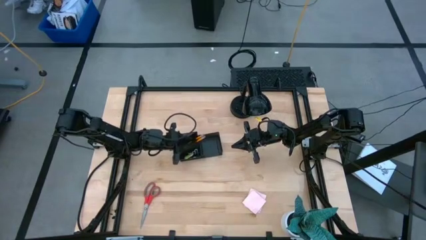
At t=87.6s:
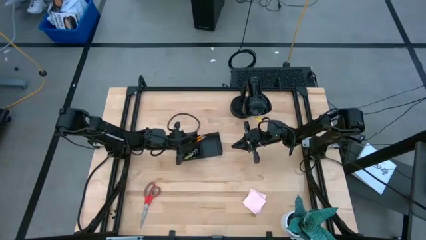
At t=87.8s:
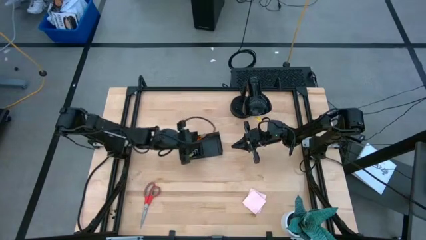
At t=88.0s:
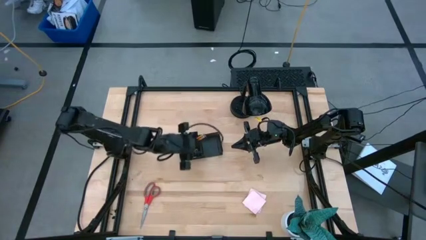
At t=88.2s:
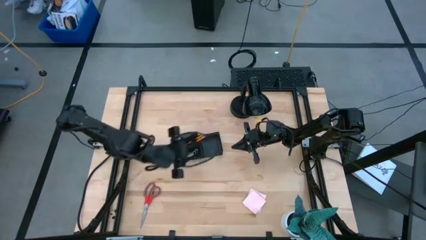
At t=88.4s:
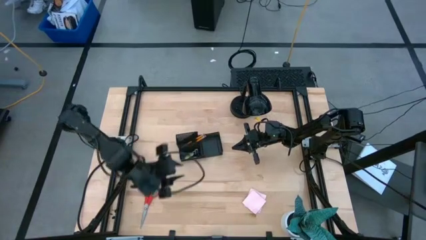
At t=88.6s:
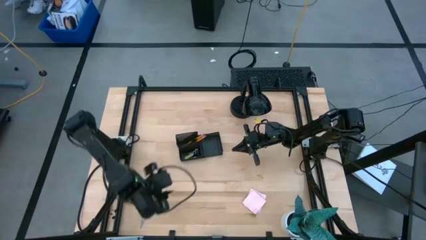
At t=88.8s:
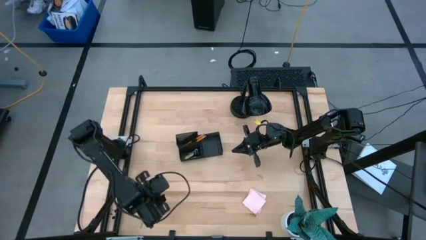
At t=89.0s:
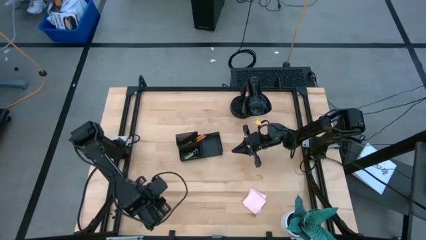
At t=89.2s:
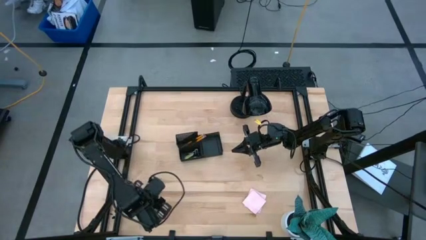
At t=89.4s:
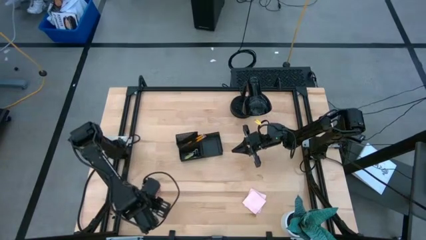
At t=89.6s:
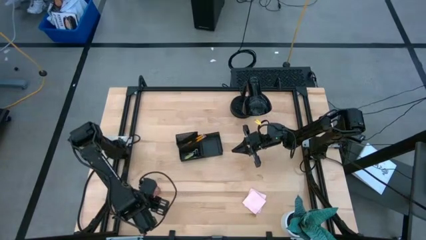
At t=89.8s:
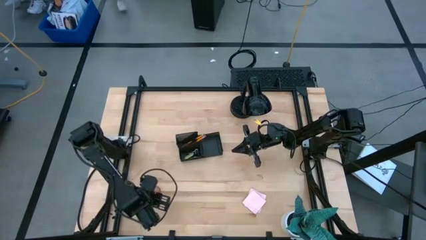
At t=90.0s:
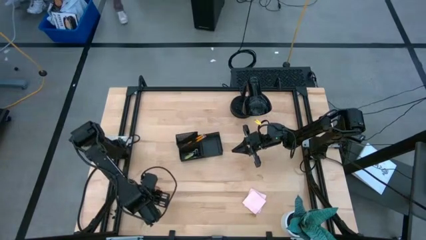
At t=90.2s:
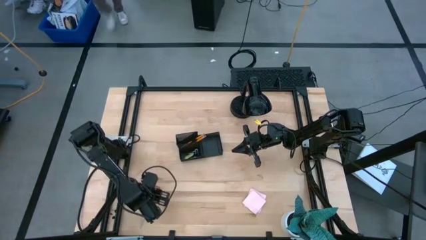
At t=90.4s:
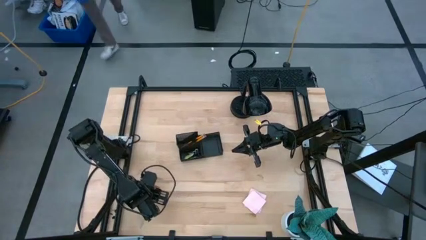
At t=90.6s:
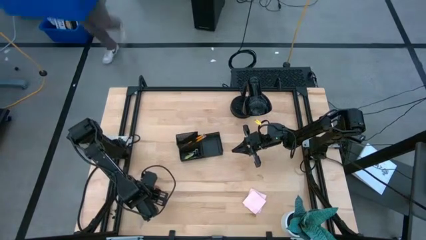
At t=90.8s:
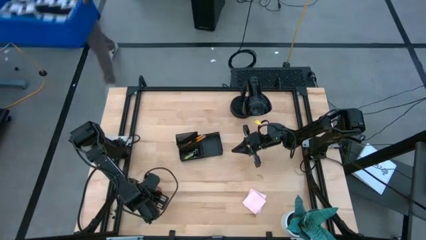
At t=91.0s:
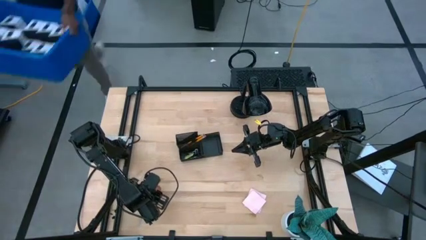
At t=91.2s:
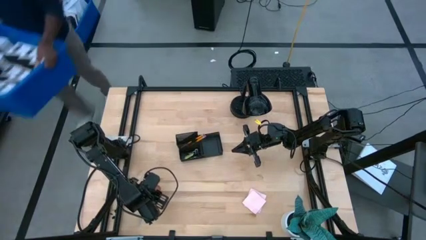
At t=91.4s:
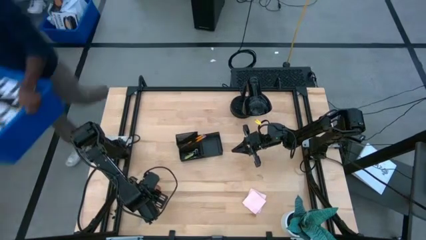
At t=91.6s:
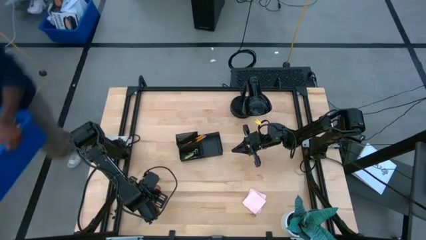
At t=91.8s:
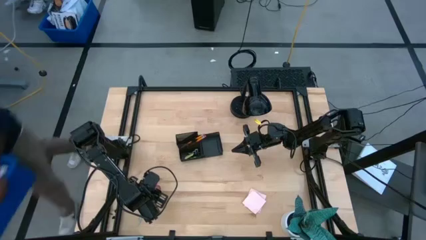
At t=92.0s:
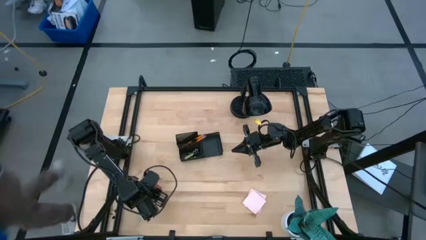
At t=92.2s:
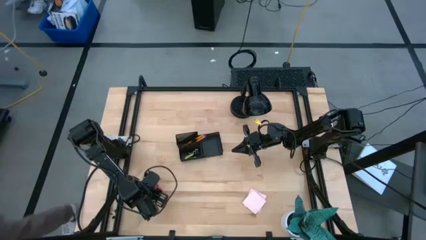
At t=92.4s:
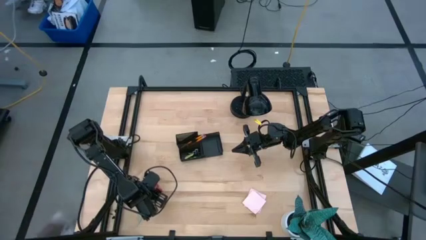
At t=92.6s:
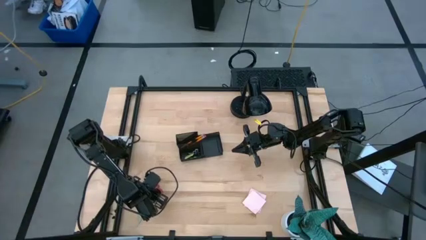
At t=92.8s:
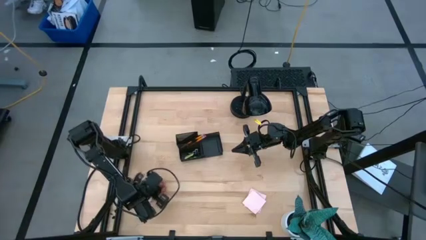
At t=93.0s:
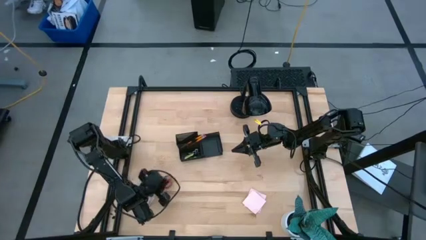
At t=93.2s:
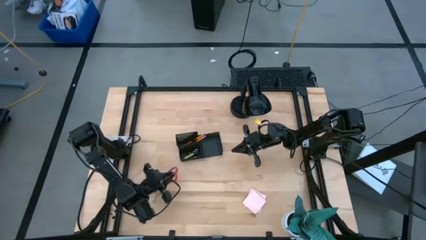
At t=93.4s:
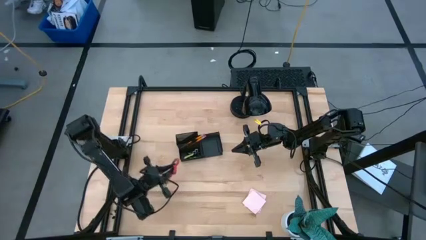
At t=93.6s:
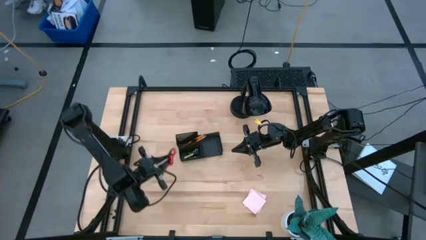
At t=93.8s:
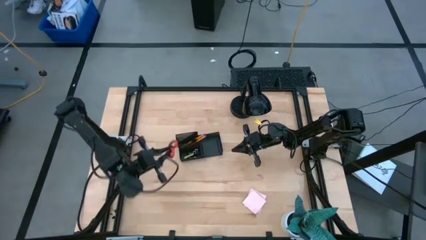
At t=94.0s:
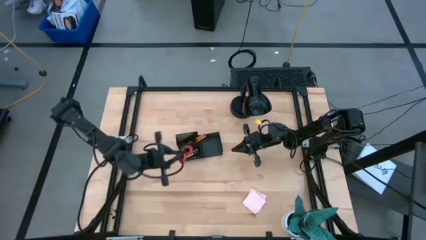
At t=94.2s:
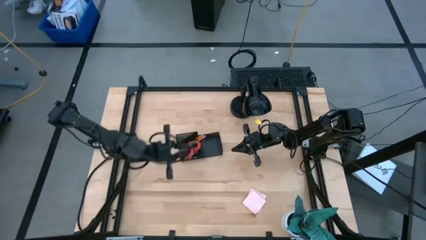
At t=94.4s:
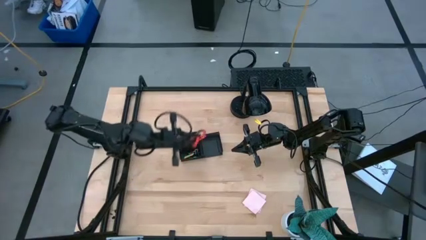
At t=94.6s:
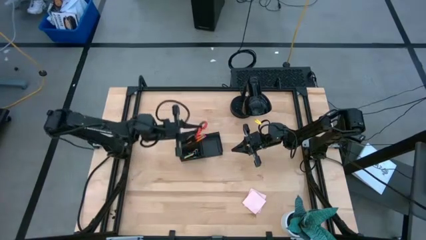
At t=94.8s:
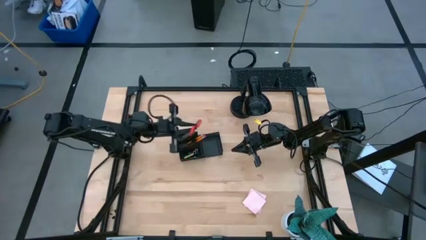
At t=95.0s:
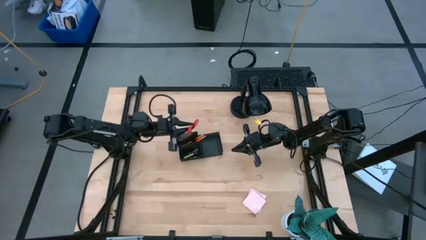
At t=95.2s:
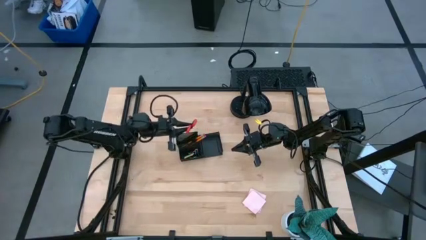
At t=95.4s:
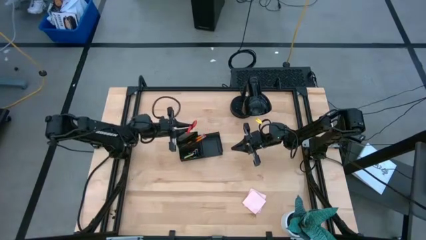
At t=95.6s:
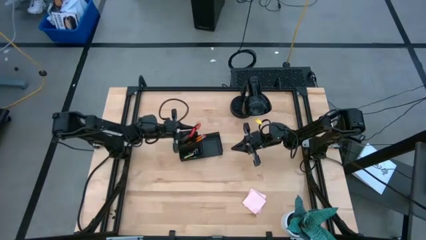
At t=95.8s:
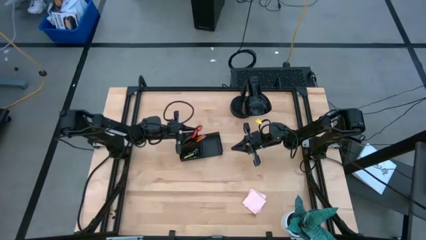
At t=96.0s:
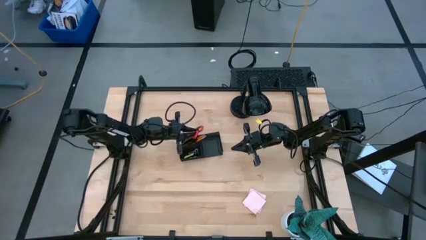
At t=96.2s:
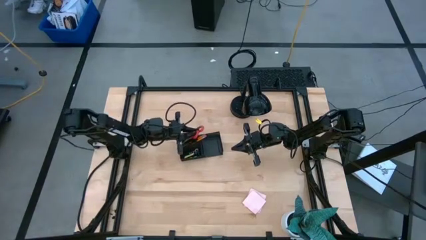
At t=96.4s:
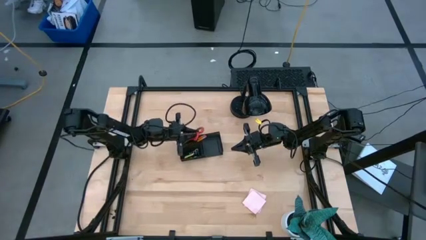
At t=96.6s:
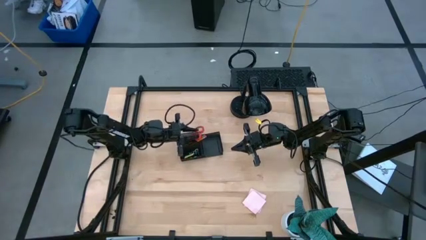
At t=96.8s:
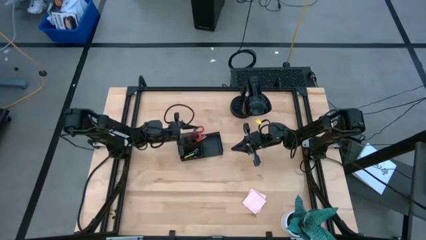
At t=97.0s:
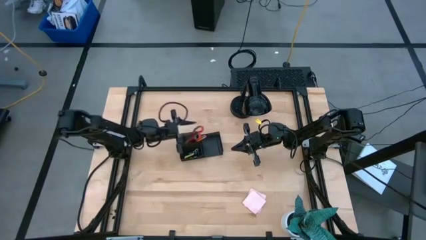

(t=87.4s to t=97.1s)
Task: Pick and place office supplies into organizer
Put the red scissors into the black desk organizer

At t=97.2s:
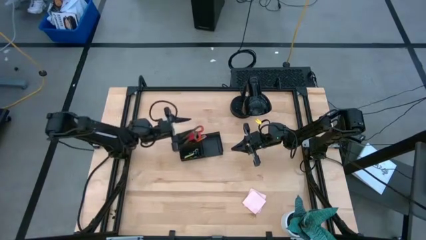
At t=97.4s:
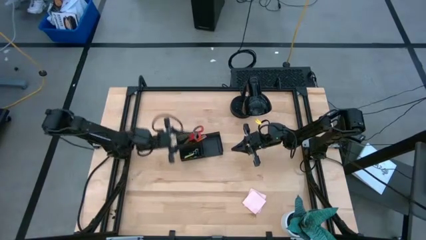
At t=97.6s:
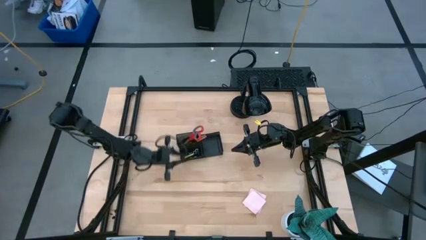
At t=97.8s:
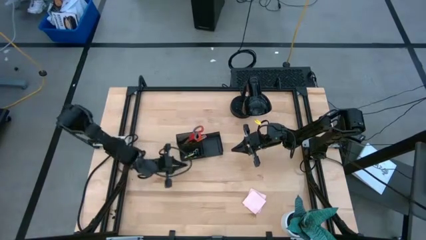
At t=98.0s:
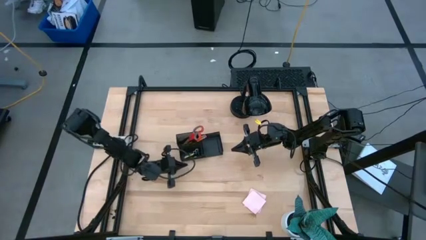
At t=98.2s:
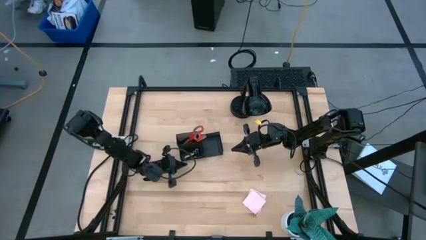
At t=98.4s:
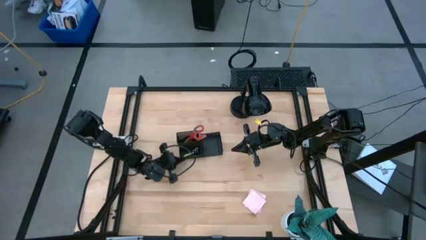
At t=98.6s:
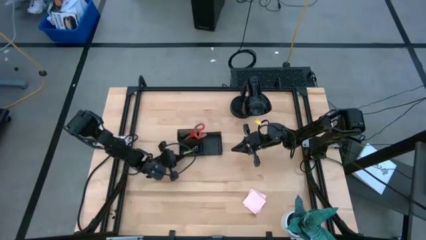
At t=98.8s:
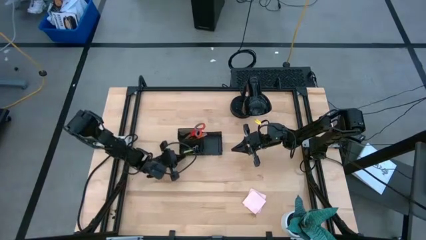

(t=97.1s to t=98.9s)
Adjust the black desk organizer

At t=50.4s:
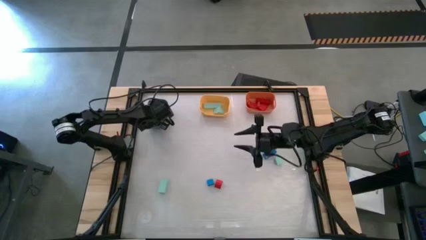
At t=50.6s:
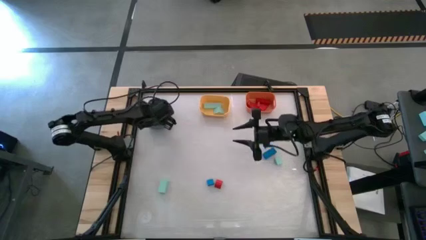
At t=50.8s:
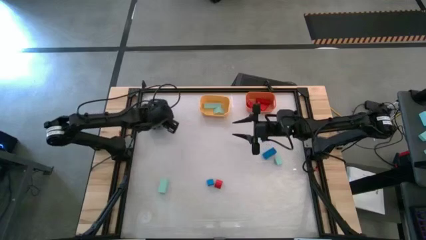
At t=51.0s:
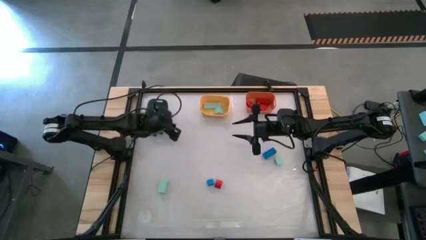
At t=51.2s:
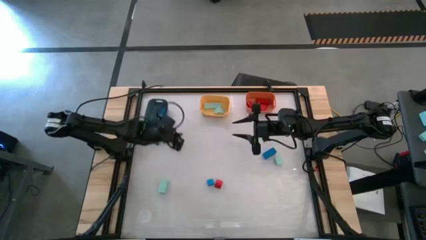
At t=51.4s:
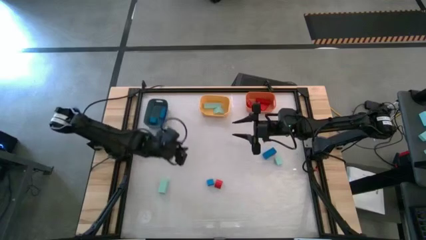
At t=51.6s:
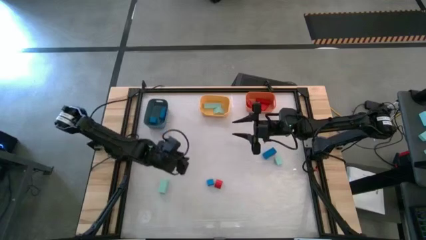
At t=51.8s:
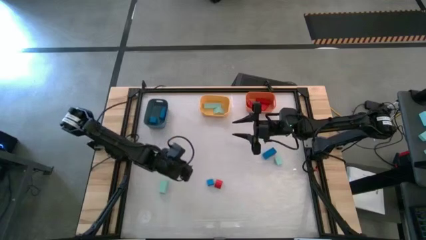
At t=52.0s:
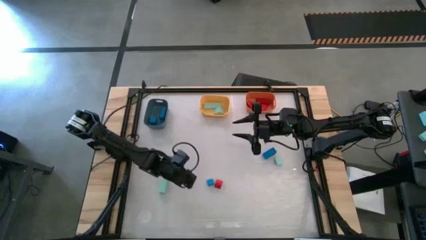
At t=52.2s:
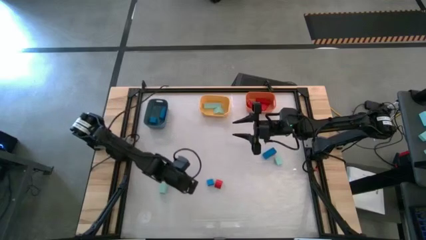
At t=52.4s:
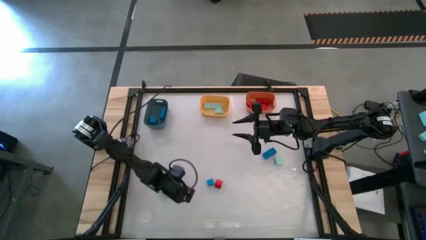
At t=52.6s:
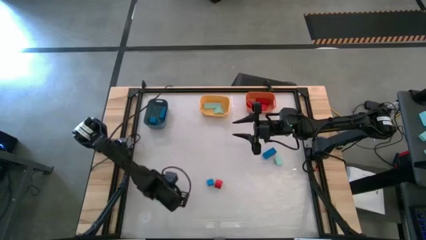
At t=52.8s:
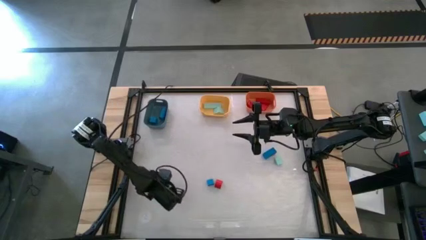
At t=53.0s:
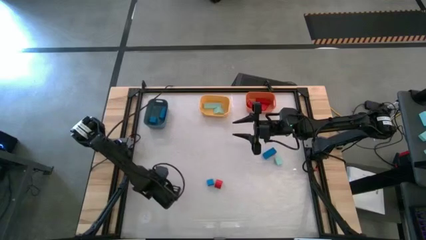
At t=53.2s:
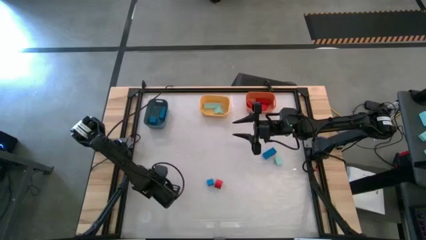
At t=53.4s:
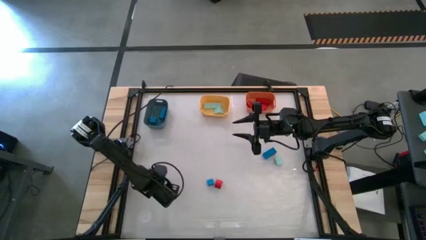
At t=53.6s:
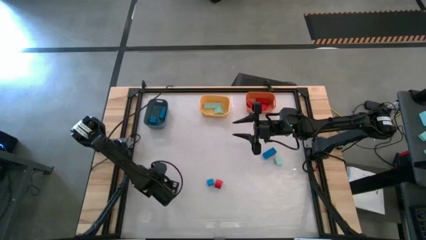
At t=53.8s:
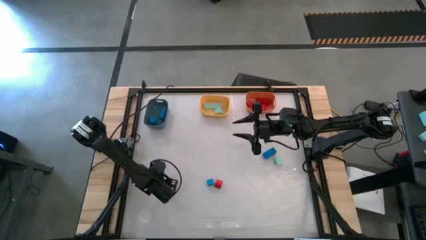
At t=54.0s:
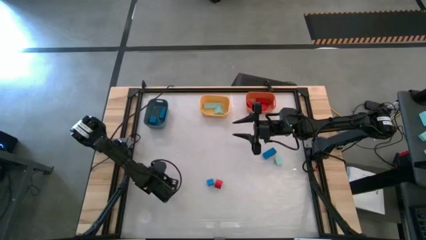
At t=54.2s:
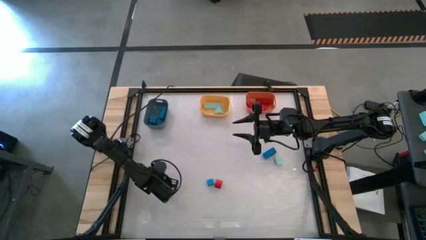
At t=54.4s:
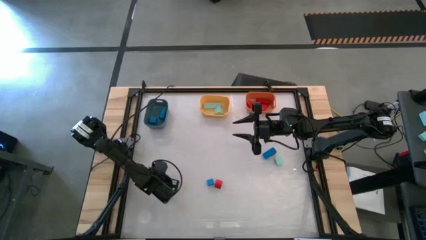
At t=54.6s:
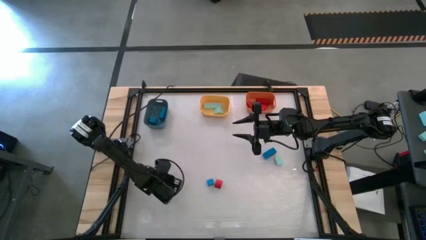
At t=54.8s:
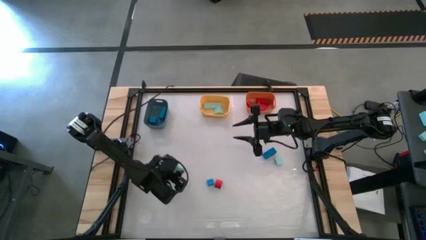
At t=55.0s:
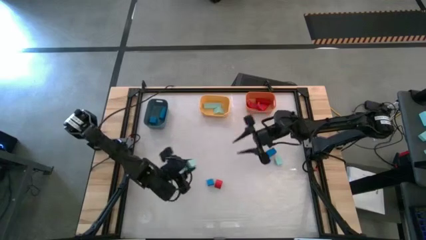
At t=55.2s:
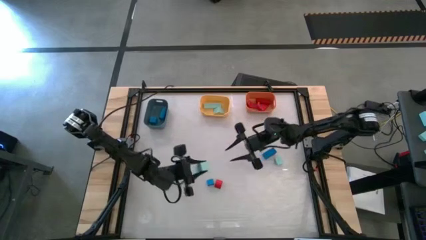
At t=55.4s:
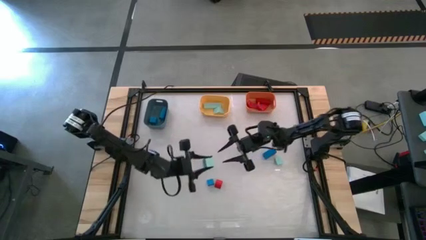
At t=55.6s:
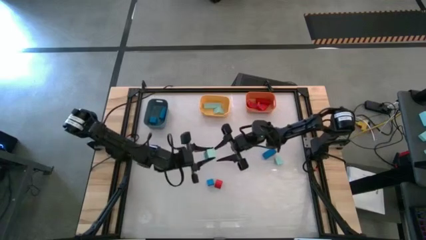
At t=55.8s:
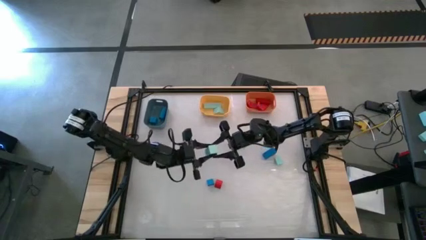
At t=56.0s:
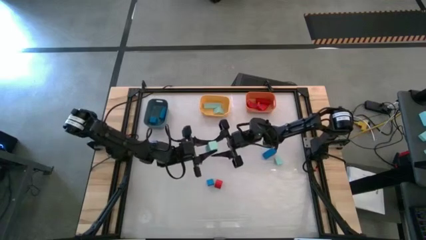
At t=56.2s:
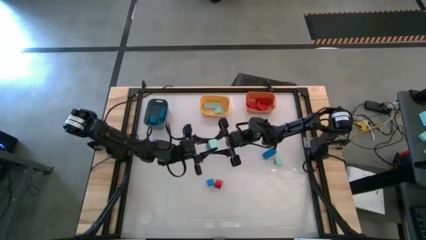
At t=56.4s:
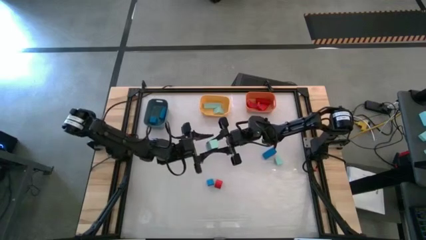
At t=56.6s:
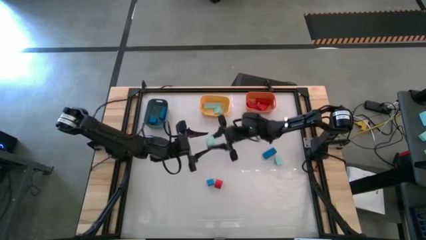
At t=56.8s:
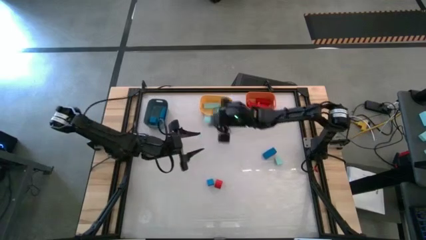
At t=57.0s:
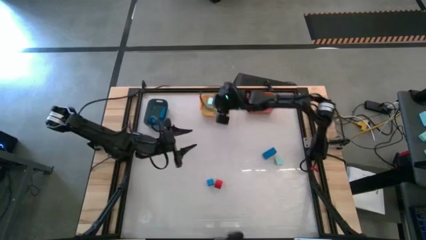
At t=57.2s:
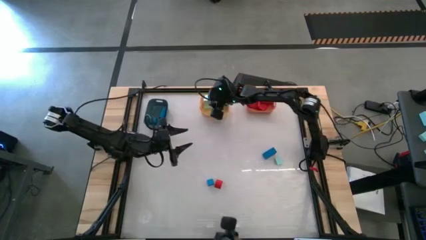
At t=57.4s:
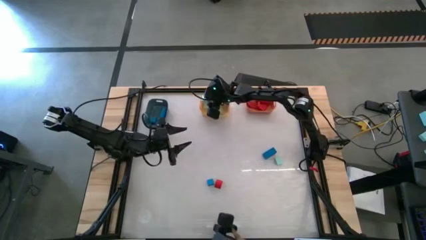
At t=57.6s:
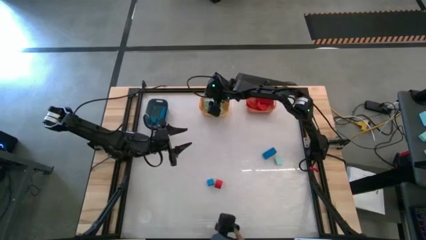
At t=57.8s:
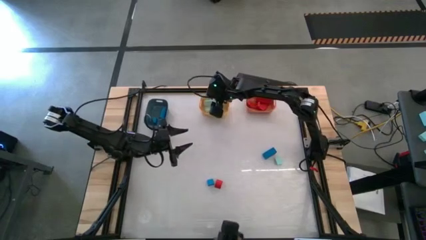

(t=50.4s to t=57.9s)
Task: Sort & place blocks by color
Put the small light blue rectangular block into the yellow bin
